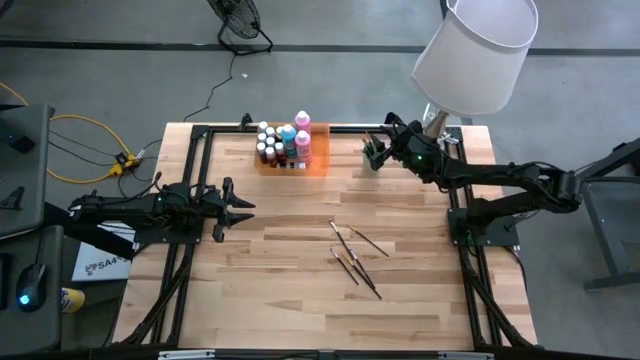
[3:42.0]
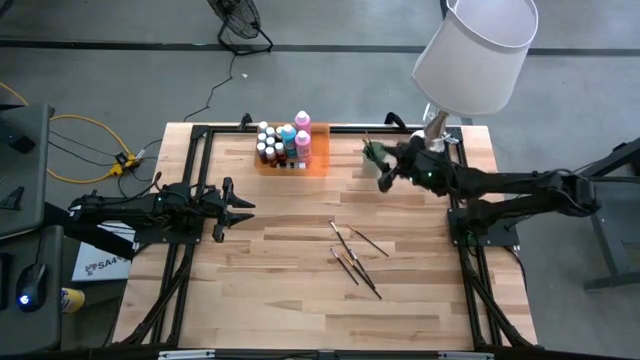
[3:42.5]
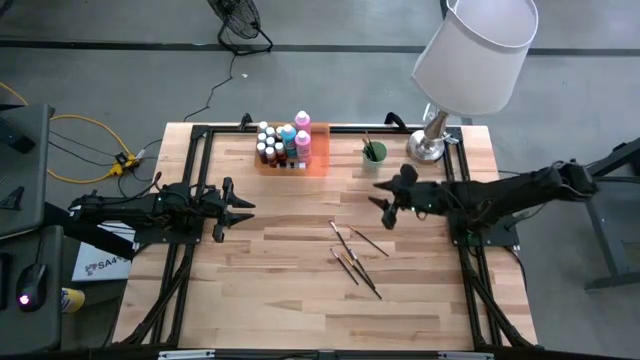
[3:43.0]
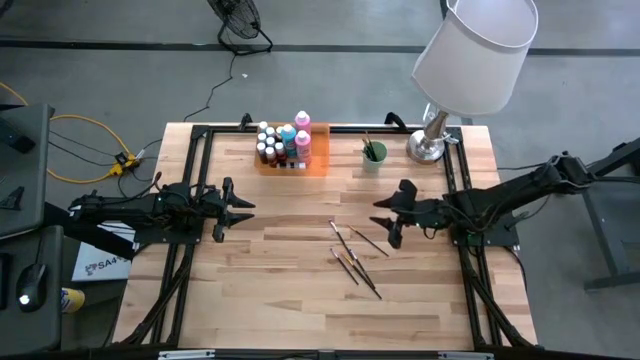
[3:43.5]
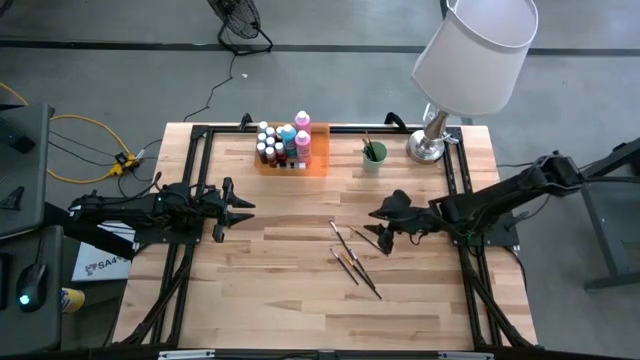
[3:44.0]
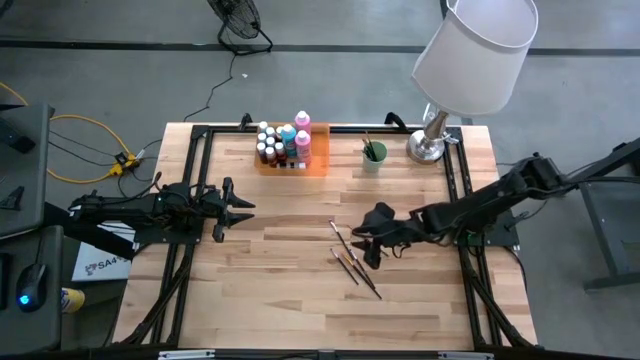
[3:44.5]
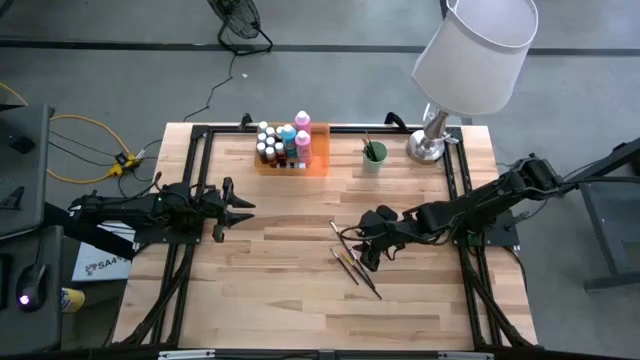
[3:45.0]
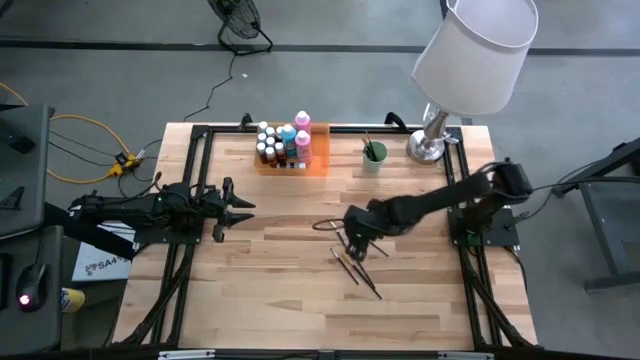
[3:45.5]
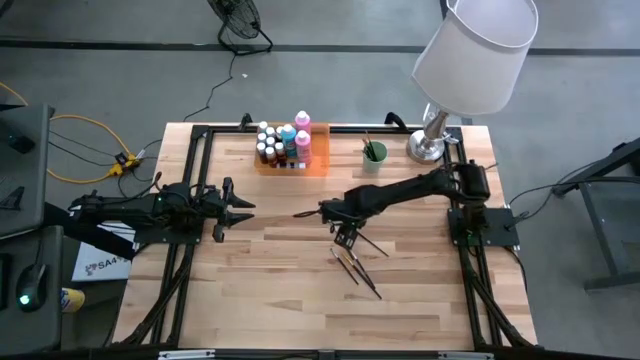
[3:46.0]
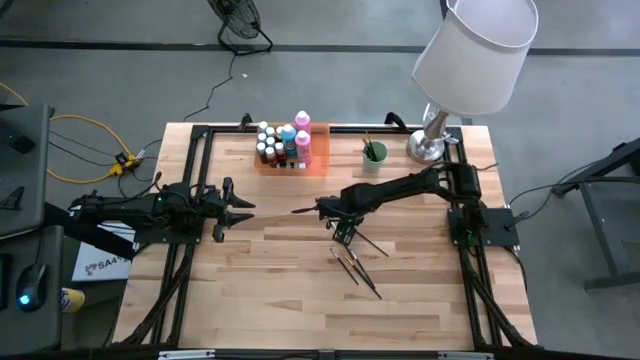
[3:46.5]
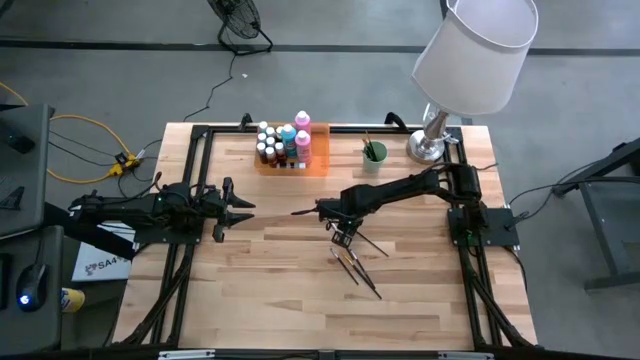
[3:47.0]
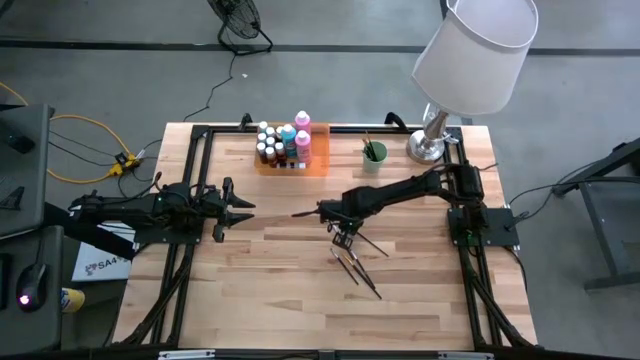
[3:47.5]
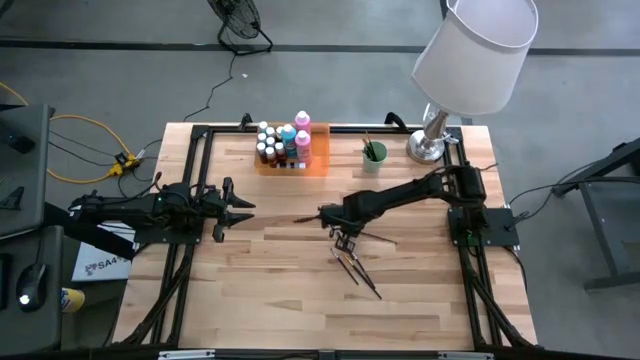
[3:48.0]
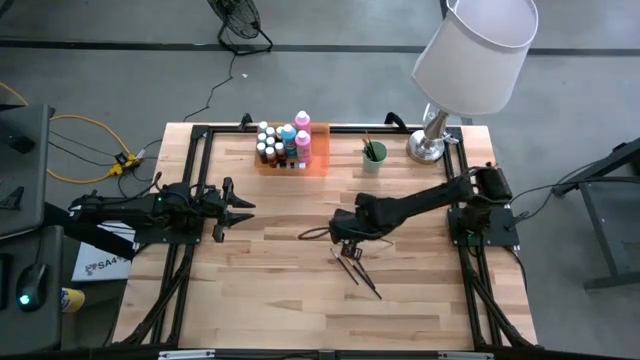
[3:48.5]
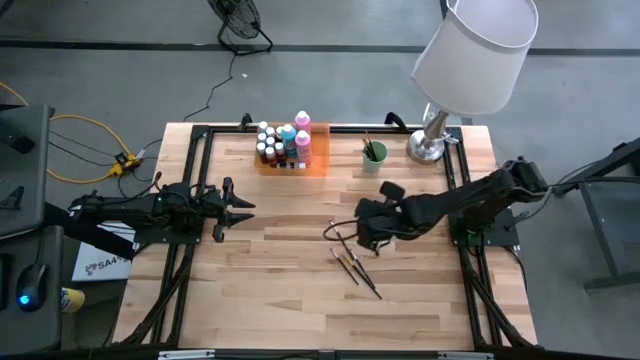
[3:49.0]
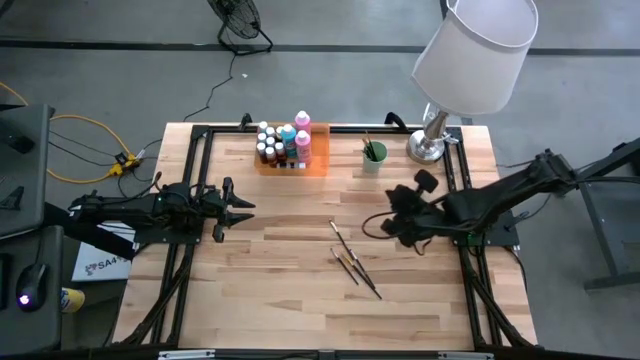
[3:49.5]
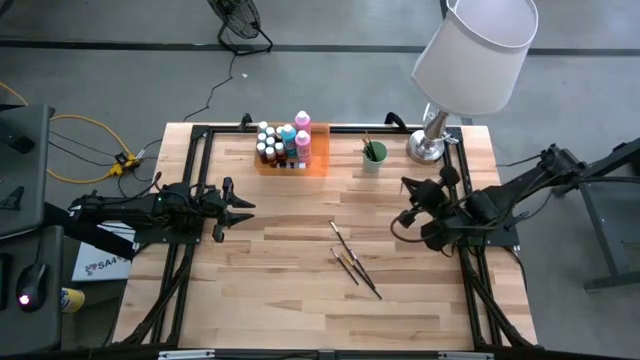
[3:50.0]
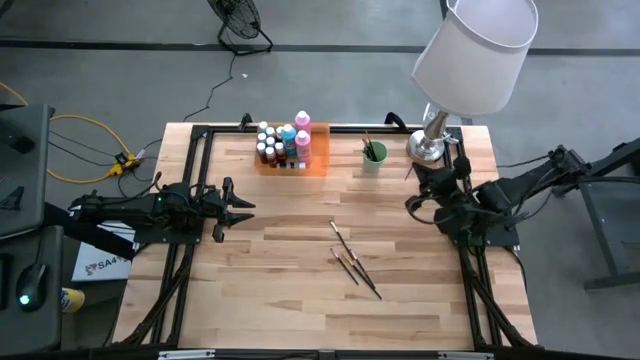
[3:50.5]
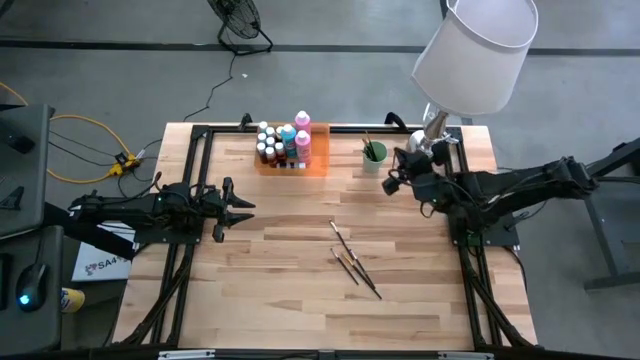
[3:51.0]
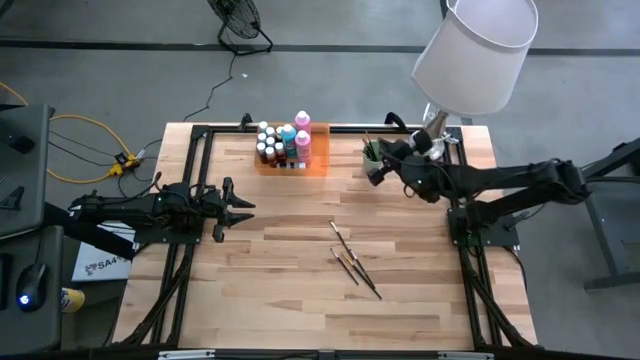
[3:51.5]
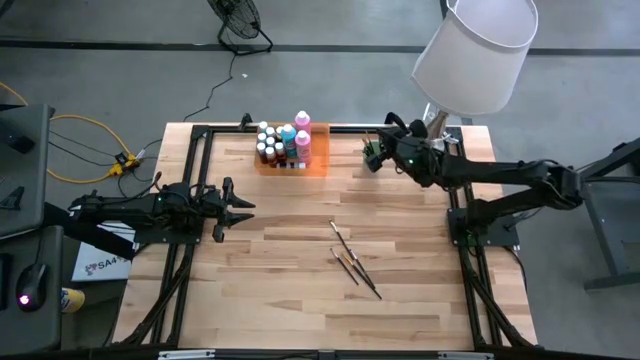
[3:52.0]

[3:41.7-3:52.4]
Task: Pick & Place Paint Supplies
Put the gold paint brush into the green cup

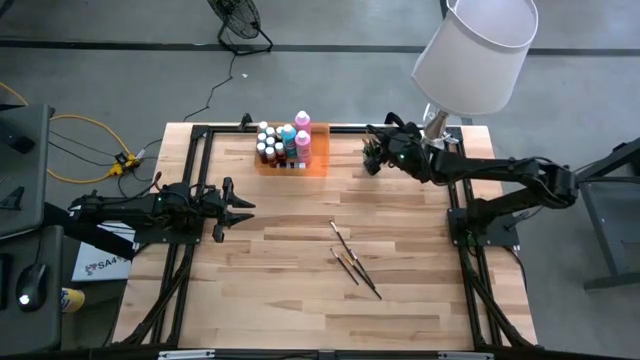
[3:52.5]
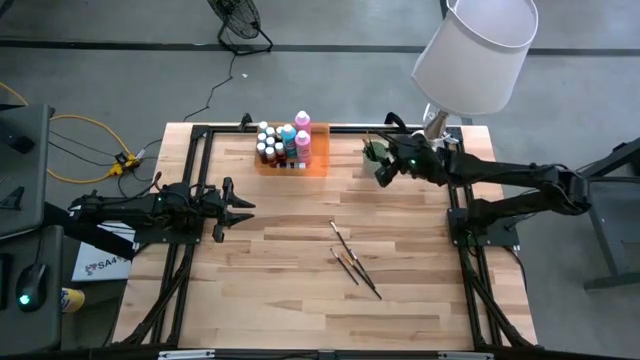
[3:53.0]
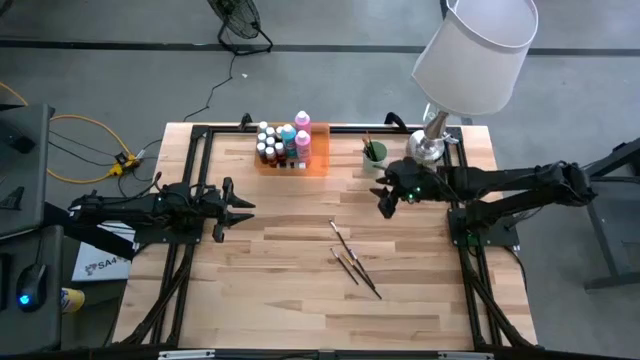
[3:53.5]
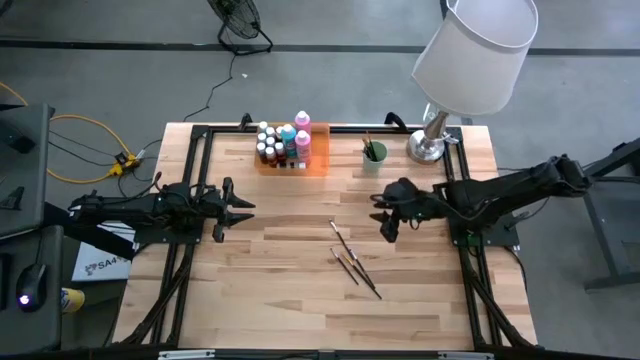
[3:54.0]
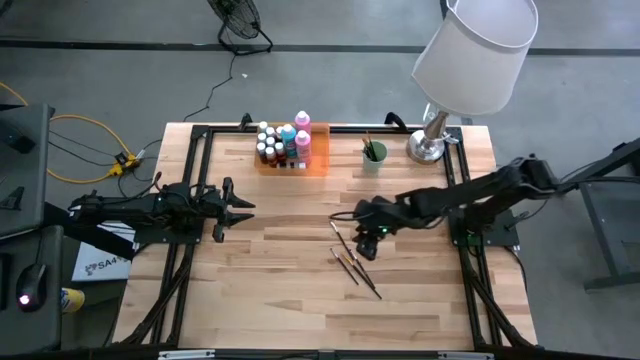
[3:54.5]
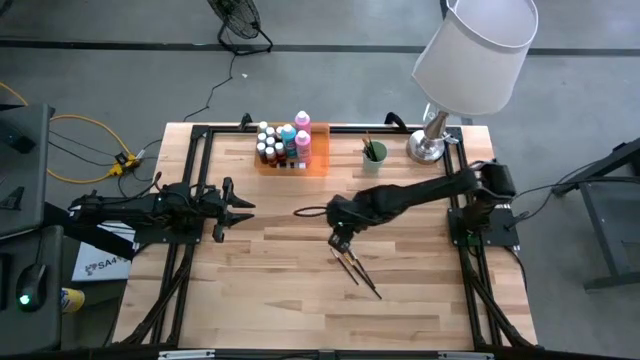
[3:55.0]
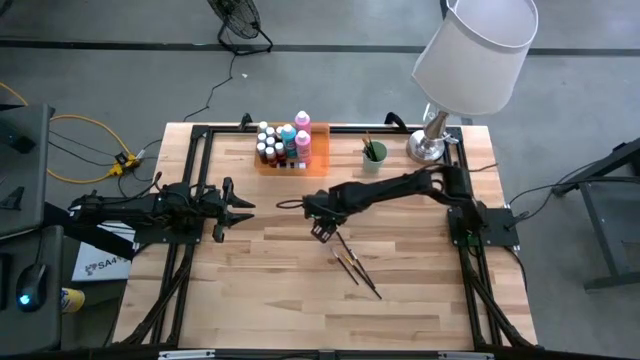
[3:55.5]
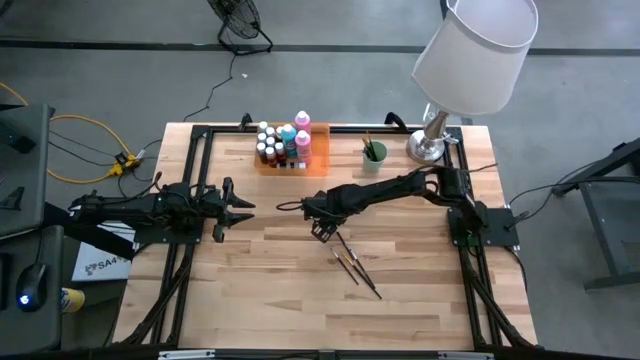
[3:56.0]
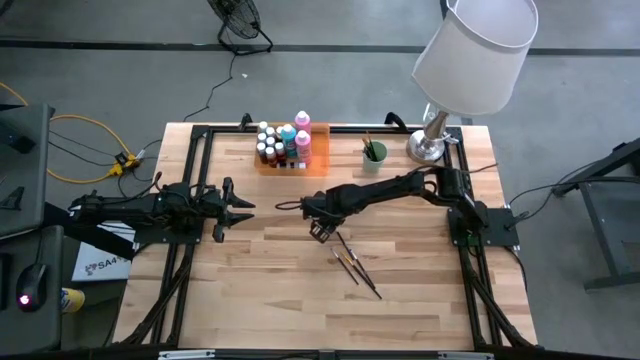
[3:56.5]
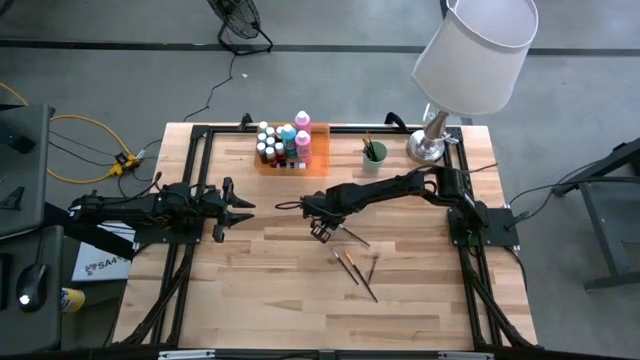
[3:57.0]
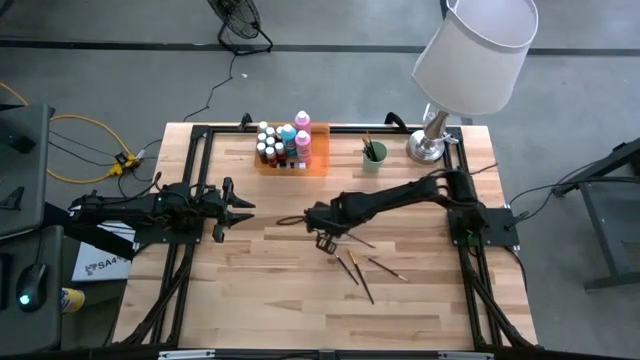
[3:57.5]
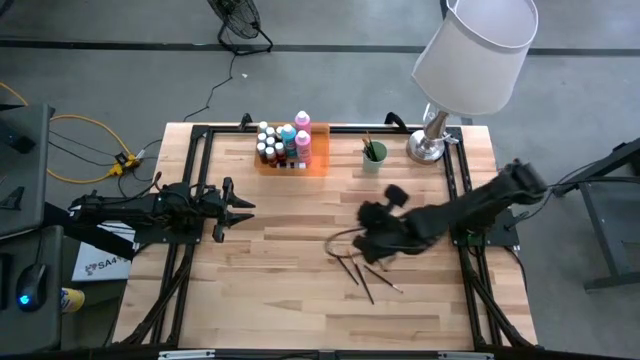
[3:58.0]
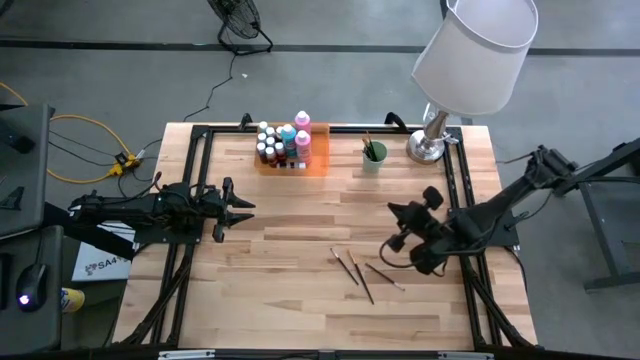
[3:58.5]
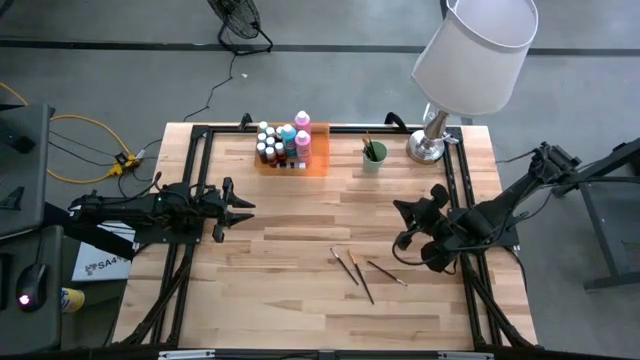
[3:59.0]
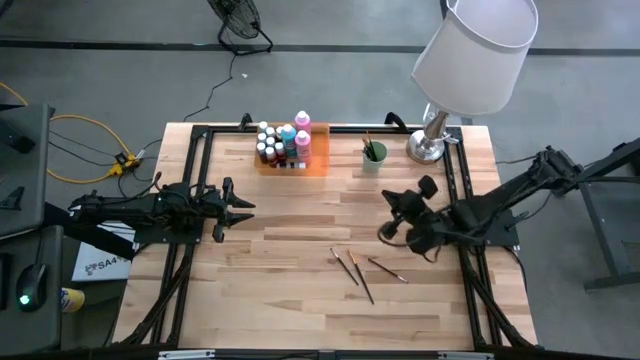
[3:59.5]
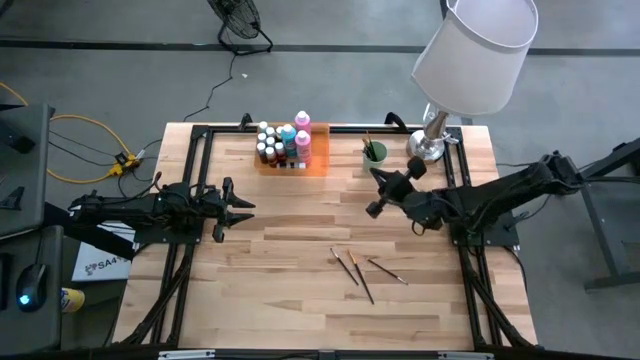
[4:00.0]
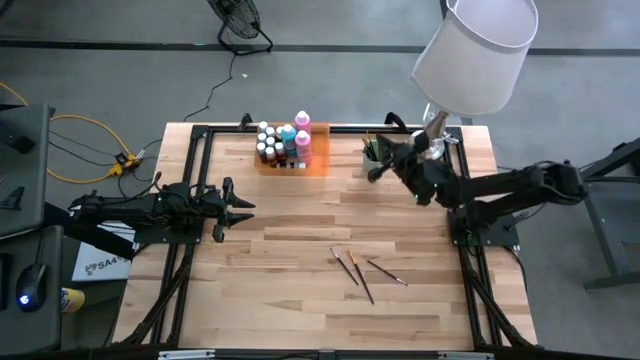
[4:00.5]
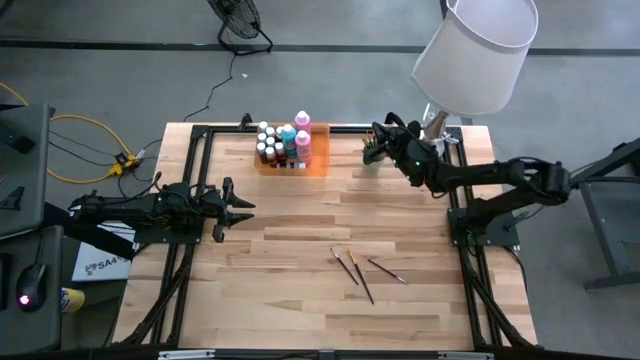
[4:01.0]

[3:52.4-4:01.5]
Put the silver paint brush into the green cup
